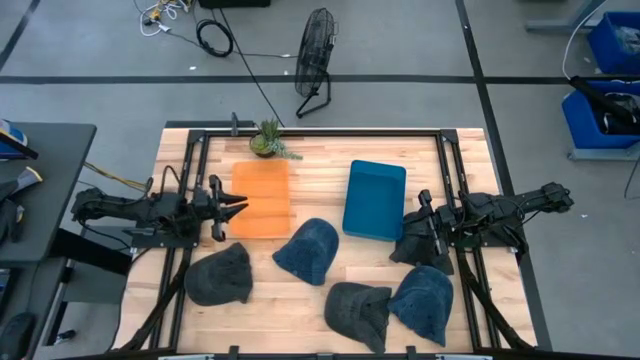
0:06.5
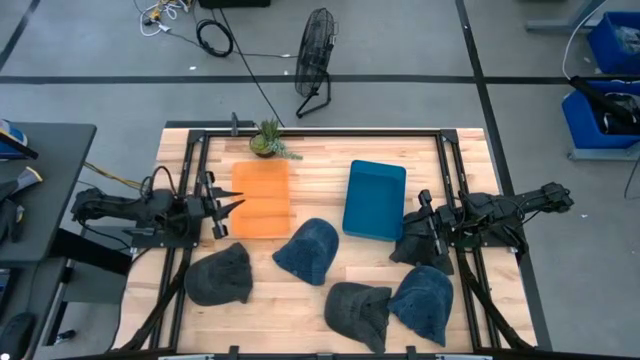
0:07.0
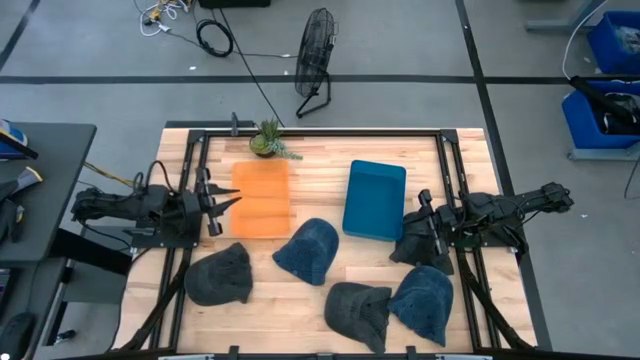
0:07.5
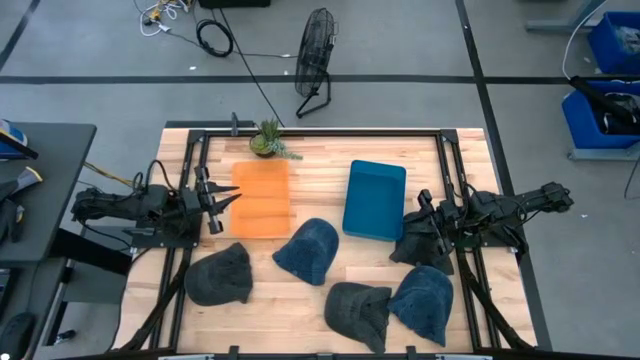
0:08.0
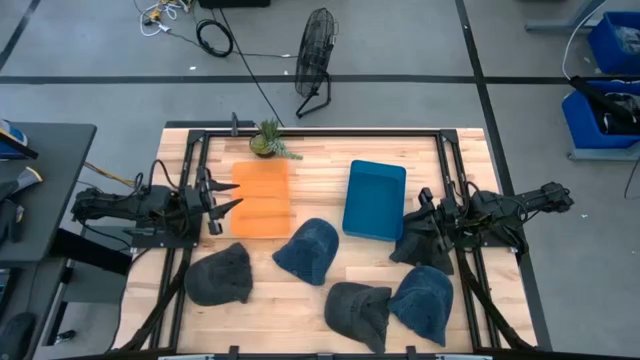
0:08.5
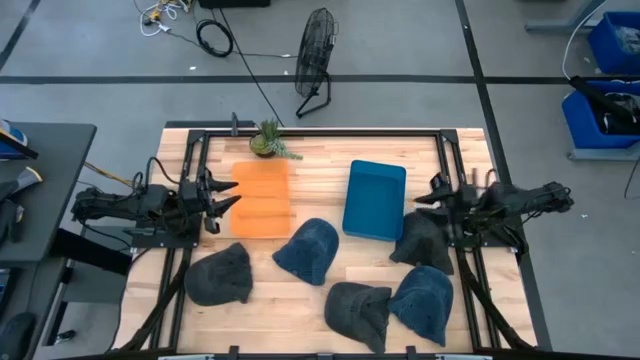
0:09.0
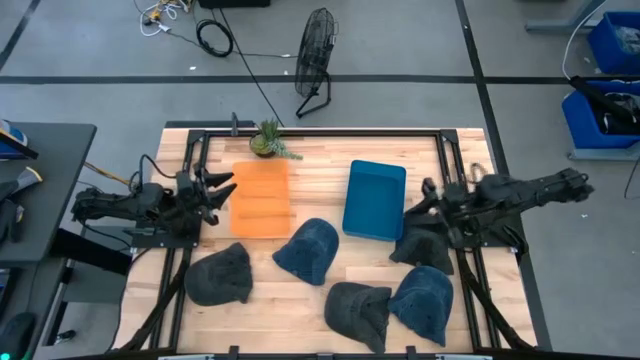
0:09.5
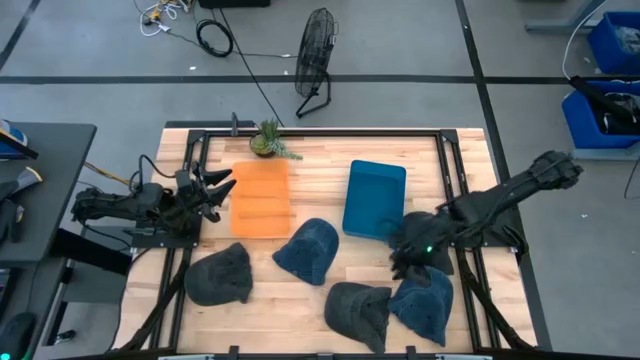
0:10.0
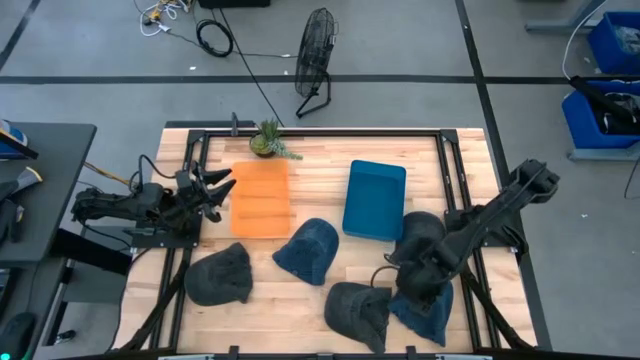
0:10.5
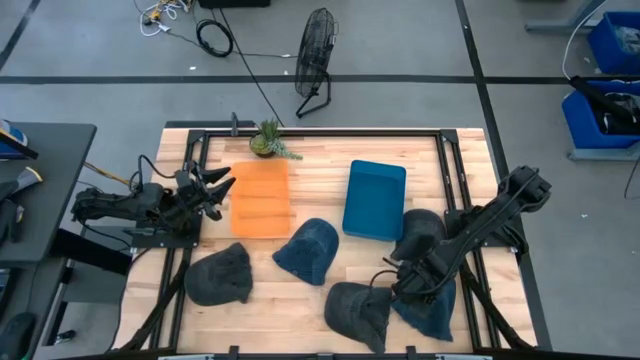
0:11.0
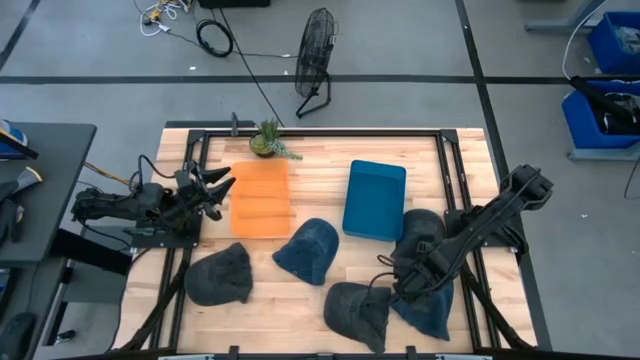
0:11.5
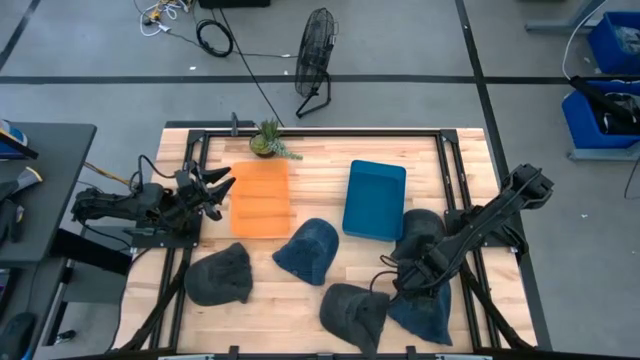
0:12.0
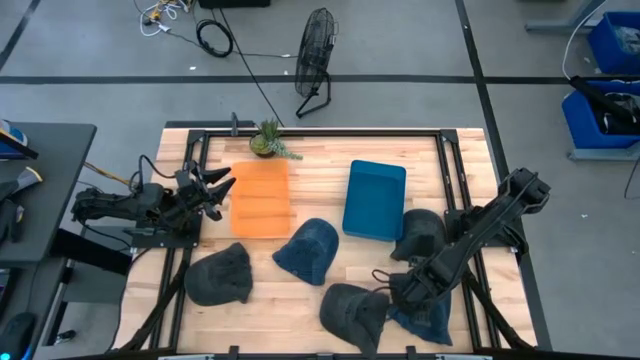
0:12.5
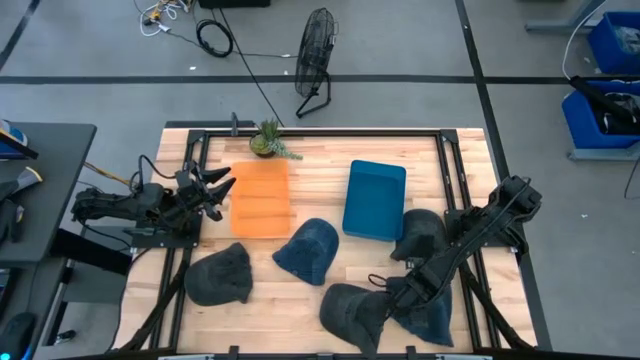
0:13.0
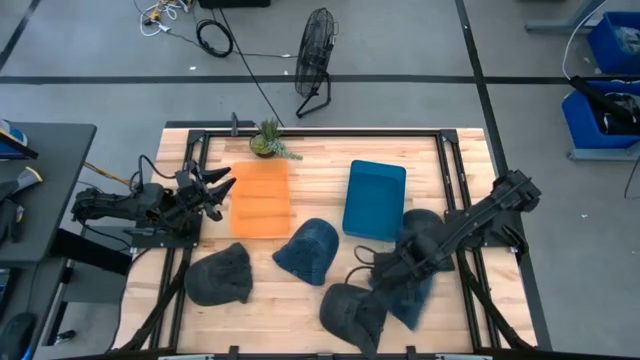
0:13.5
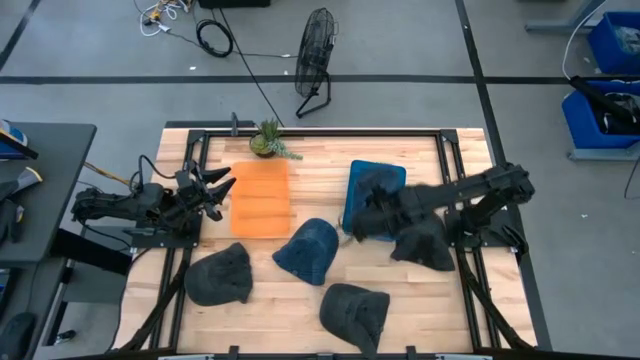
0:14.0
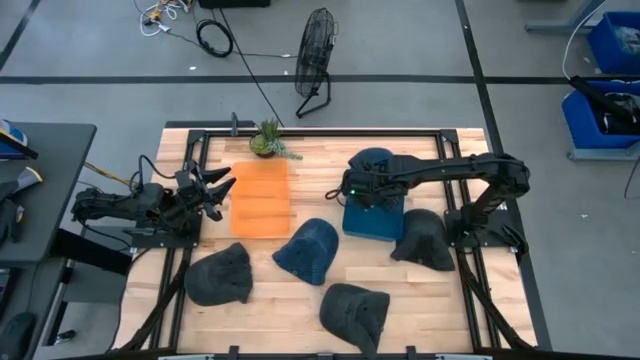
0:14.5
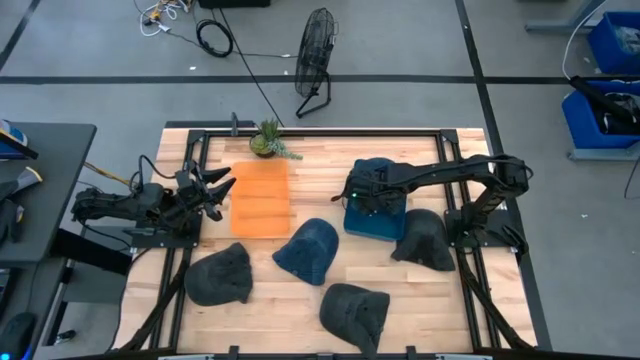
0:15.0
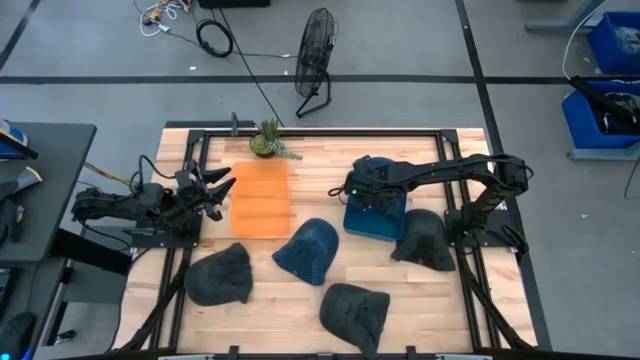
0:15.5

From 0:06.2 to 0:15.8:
Task: Pick & Place hat
Put the right blue cap into the blue bin

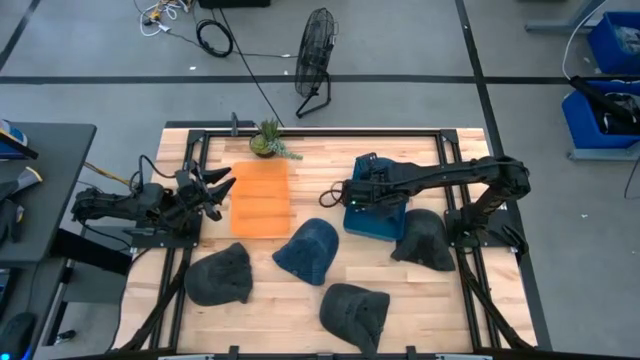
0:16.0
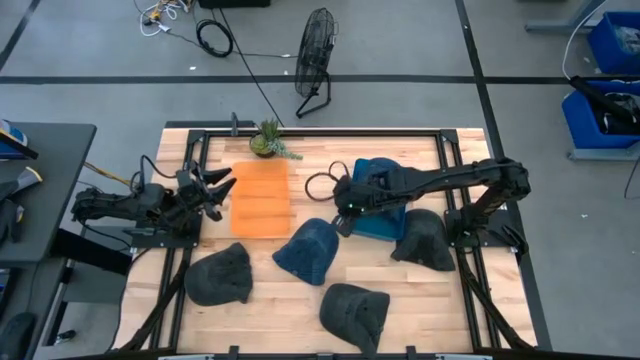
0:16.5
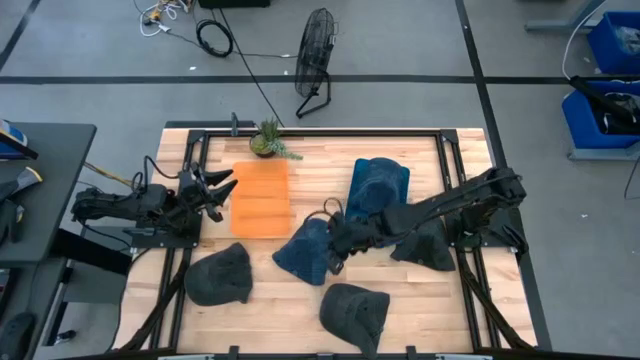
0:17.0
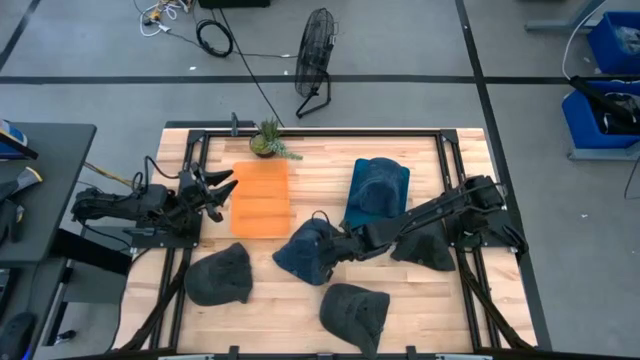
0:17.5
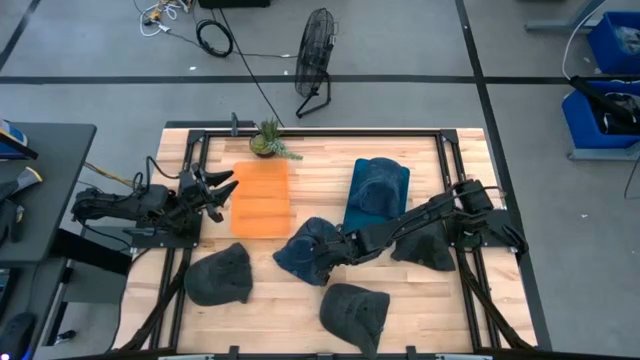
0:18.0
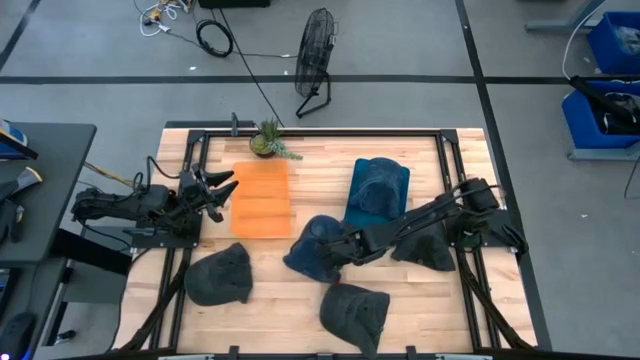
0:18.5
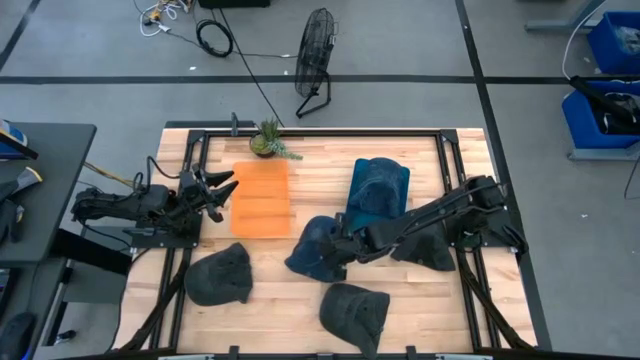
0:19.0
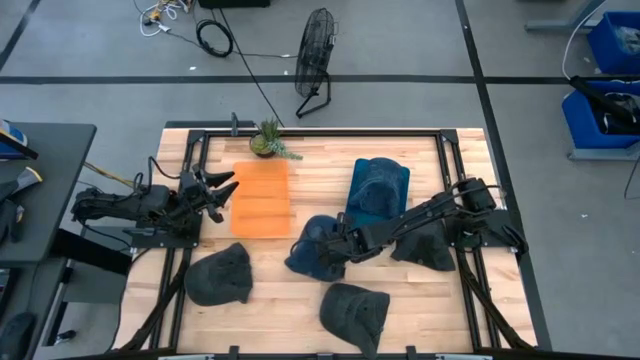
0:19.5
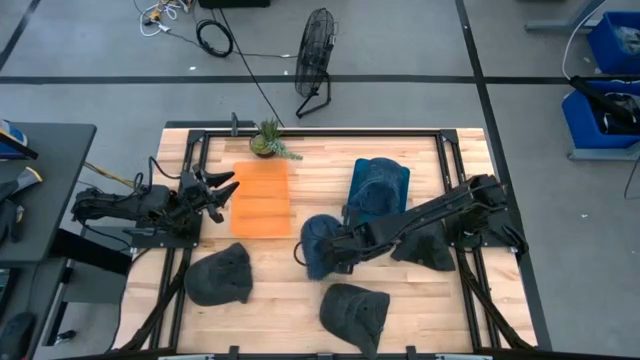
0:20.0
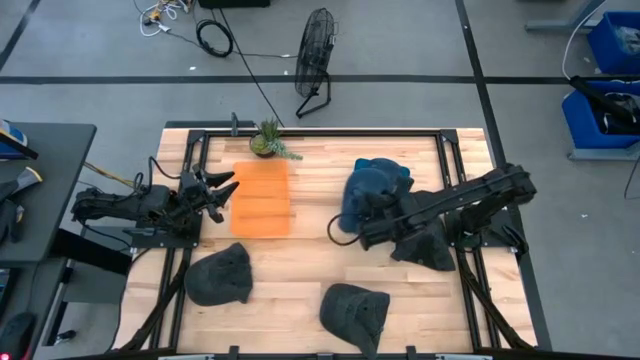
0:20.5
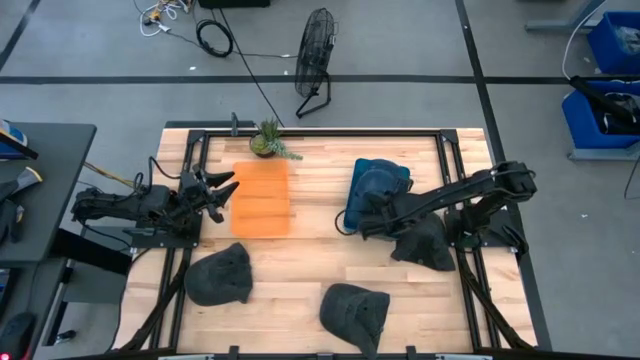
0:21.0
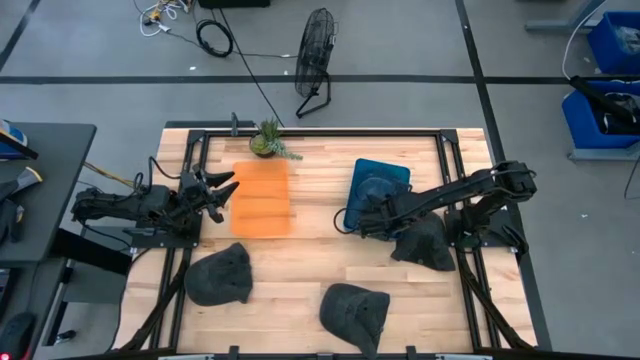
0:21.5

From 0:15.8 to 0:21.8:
Put the blue cap into the blue bin

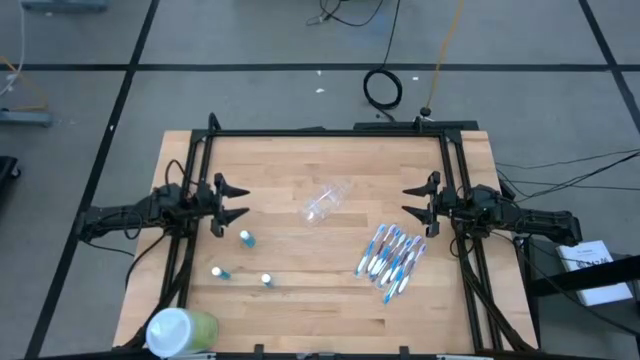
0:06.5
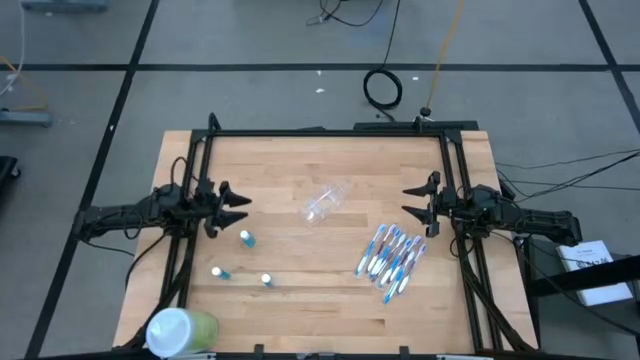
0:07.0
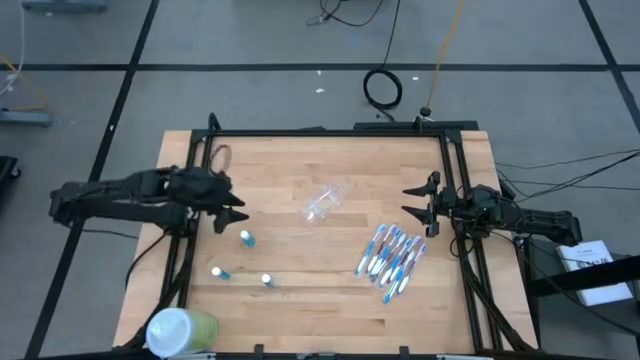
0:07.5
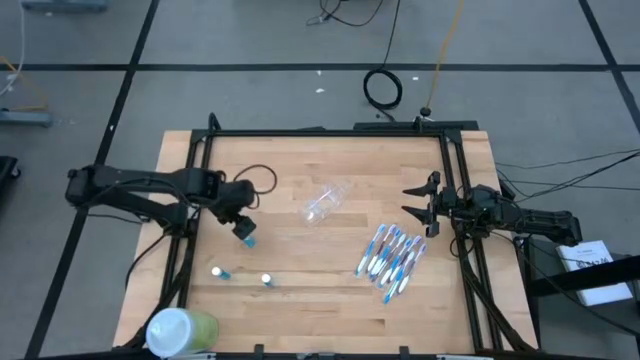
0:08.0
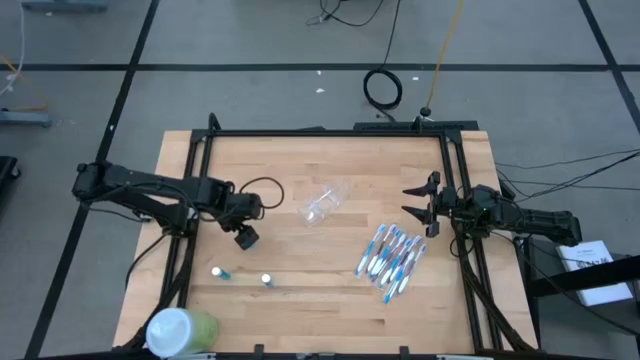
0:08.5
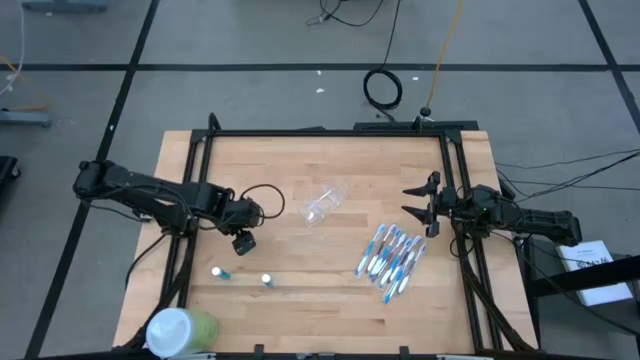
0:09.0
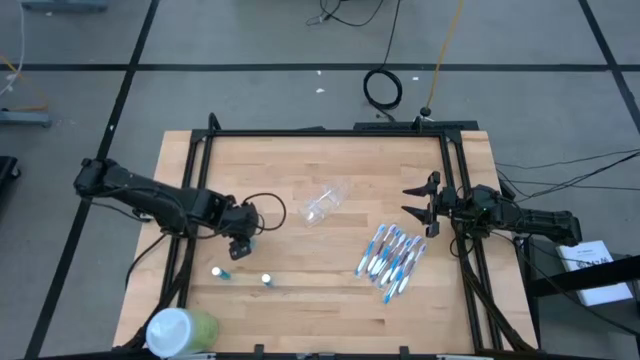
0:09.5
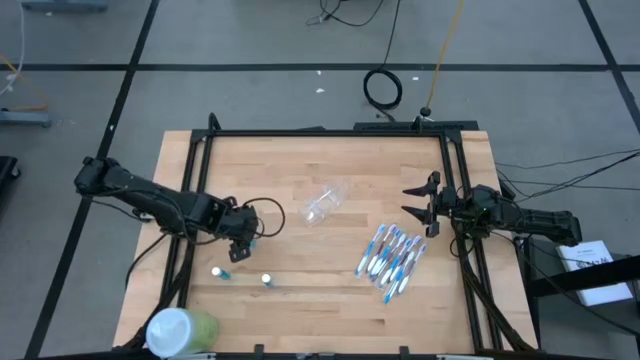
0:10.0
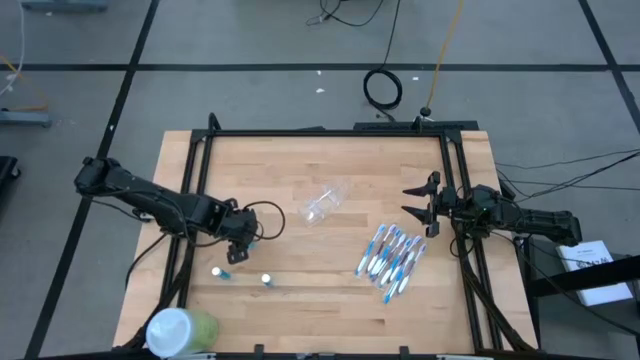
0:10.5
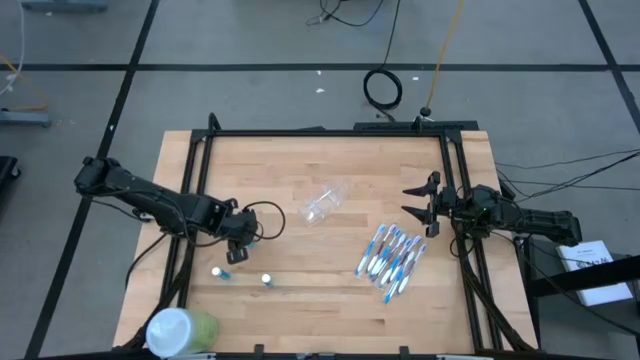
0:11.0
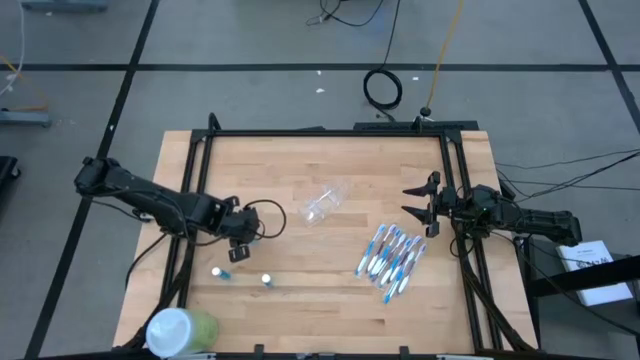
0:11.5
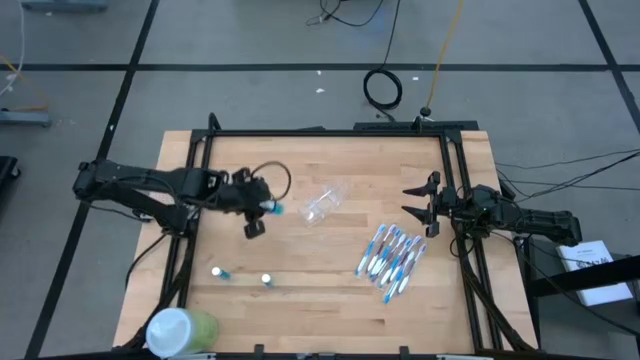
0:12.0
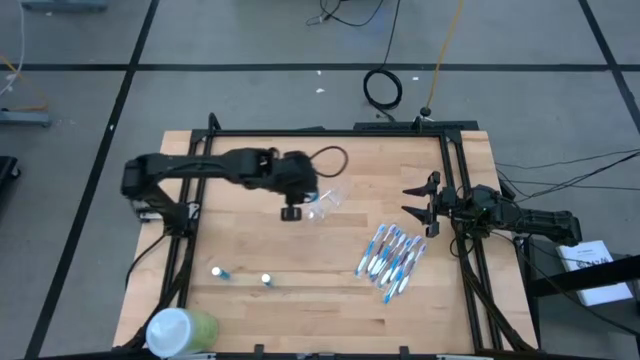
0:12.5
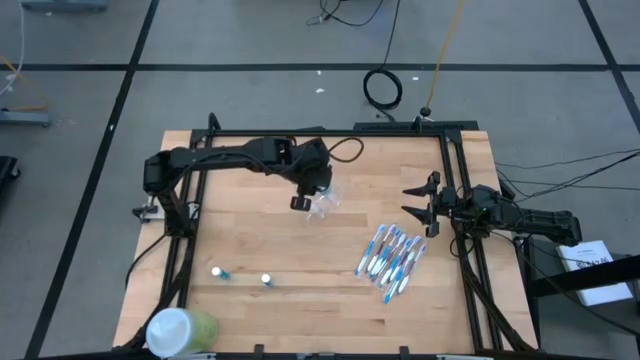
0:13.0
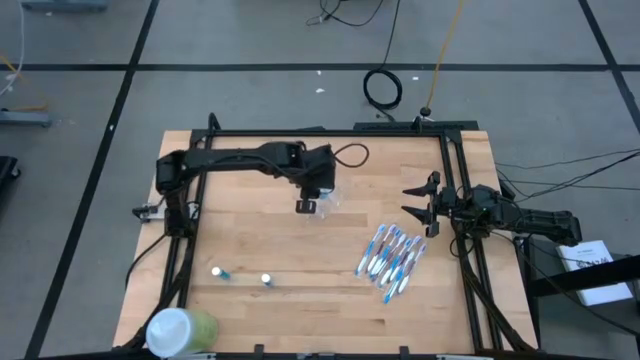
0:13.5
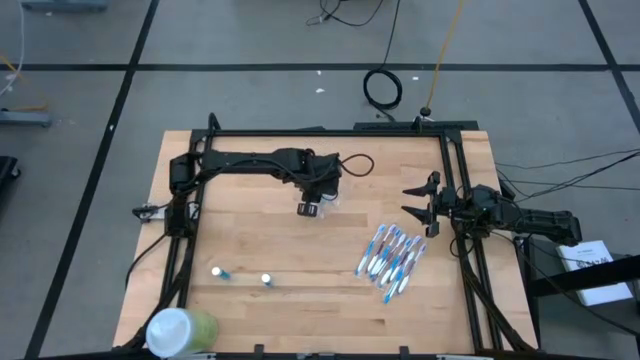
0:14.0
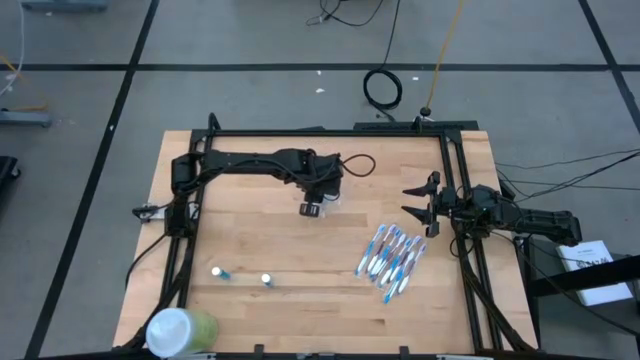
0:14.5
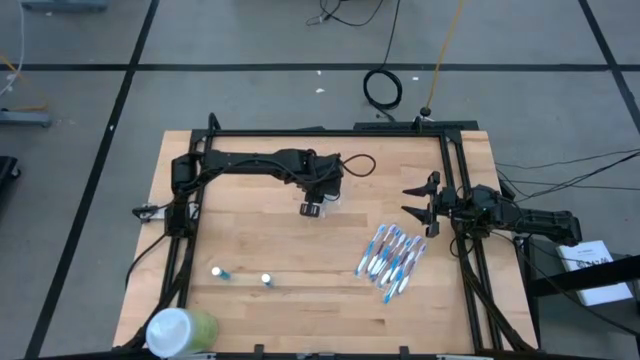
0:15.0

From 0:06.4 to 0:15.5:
Task: Pick & Place toothbrushing station
Put the blue mouthwash into the transparent organizer
